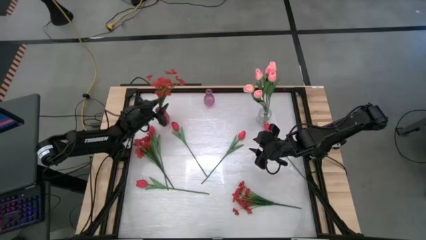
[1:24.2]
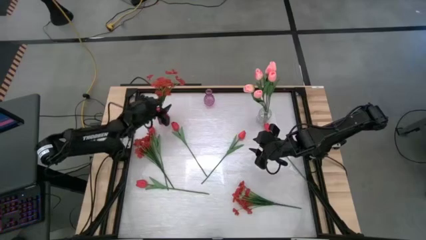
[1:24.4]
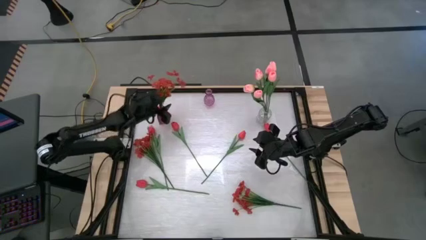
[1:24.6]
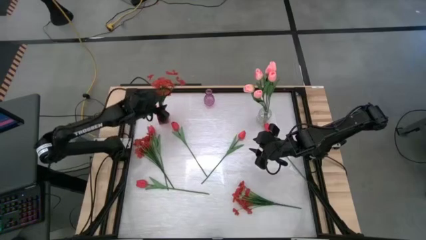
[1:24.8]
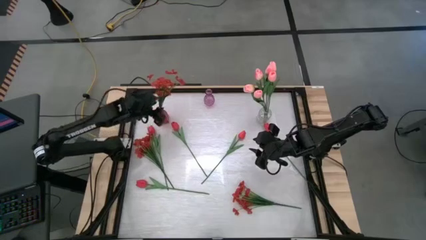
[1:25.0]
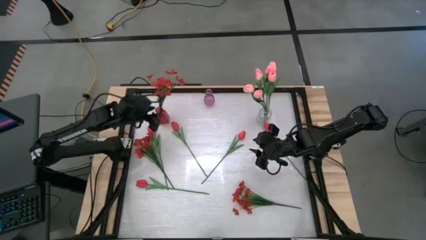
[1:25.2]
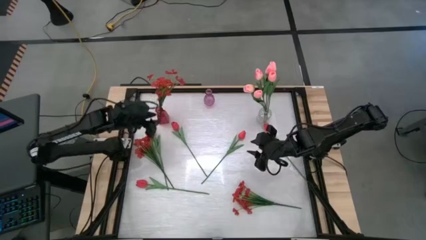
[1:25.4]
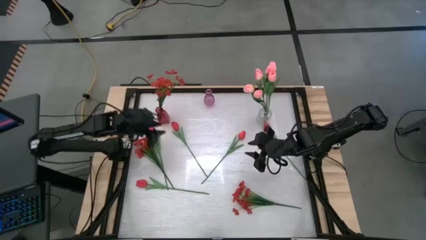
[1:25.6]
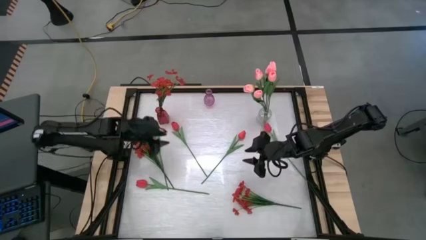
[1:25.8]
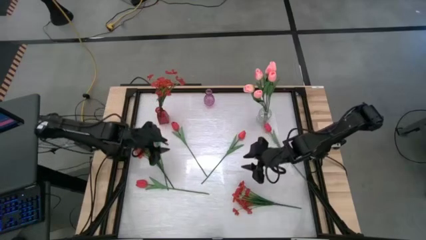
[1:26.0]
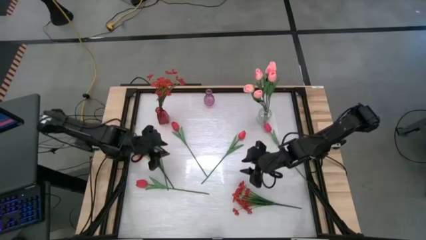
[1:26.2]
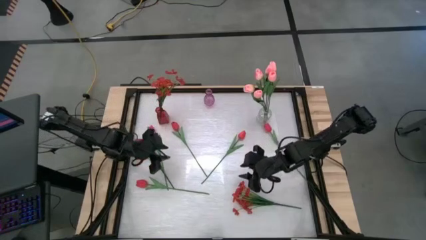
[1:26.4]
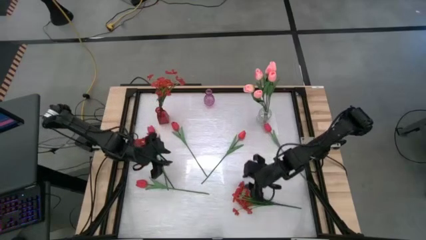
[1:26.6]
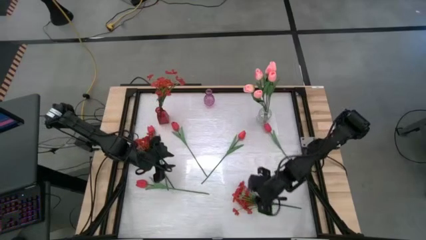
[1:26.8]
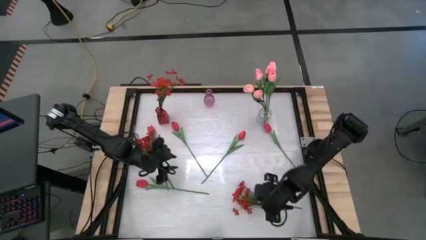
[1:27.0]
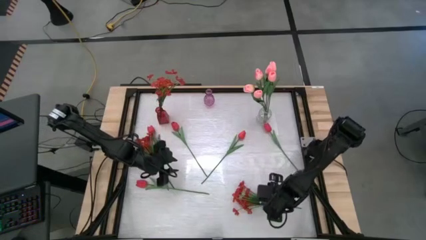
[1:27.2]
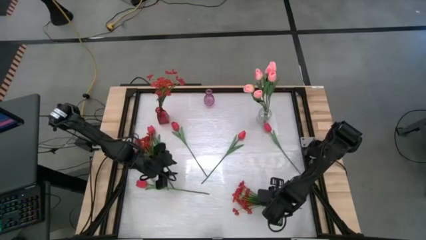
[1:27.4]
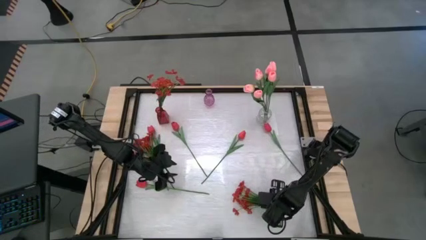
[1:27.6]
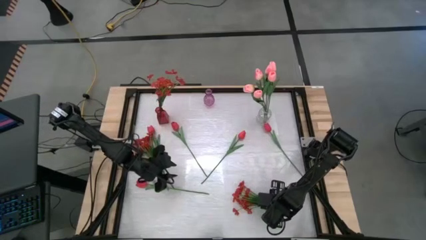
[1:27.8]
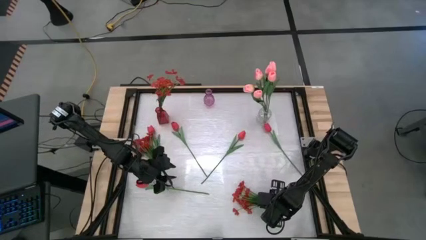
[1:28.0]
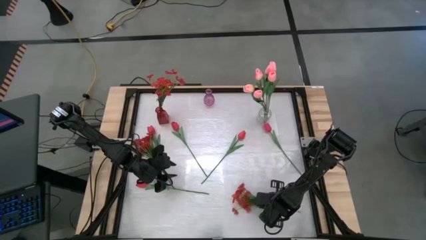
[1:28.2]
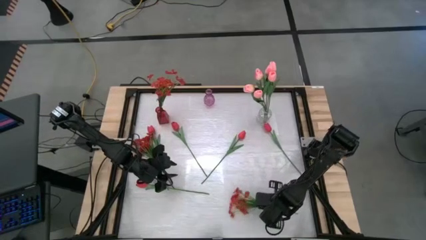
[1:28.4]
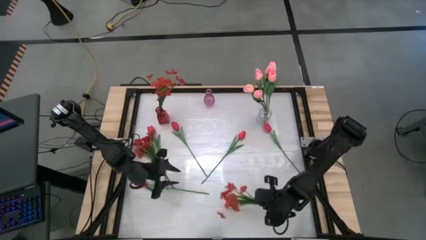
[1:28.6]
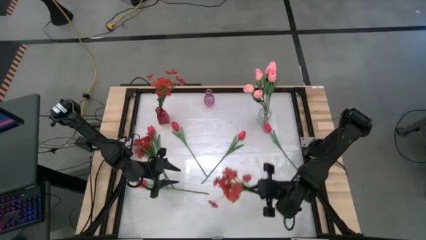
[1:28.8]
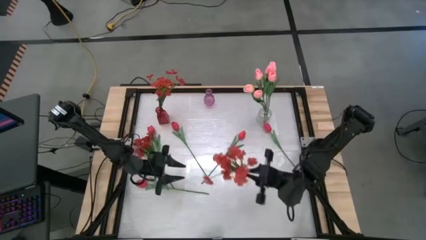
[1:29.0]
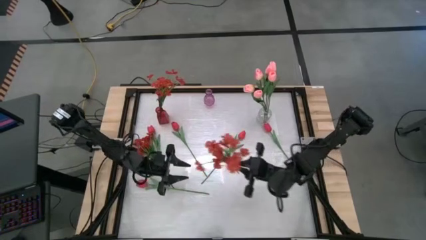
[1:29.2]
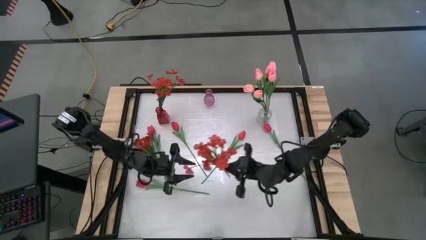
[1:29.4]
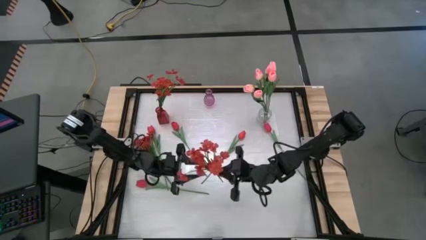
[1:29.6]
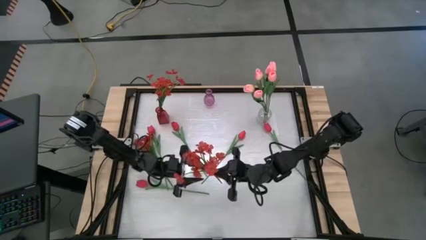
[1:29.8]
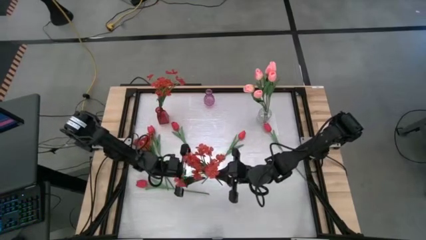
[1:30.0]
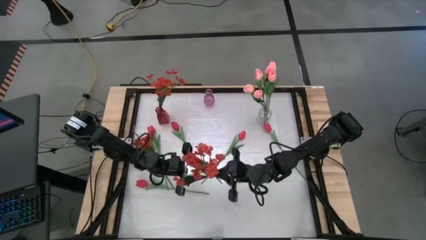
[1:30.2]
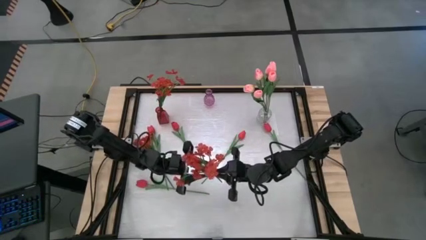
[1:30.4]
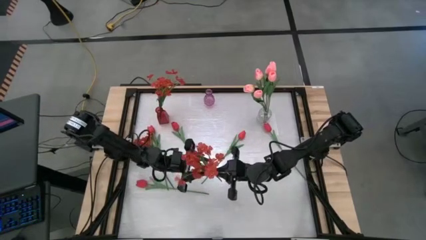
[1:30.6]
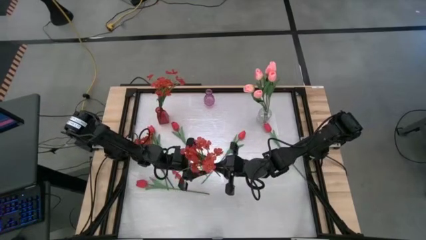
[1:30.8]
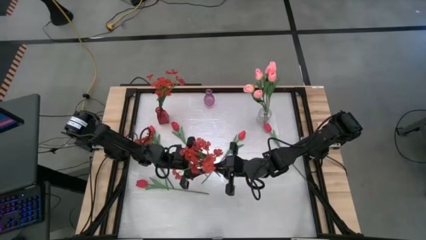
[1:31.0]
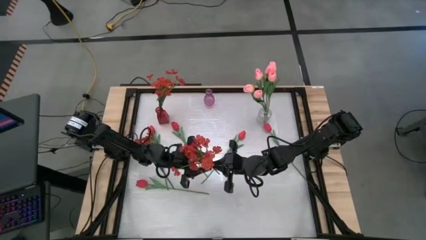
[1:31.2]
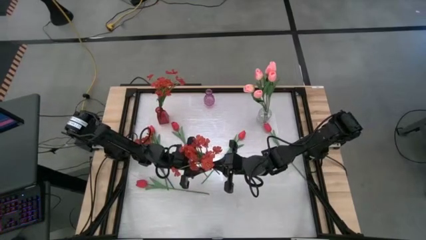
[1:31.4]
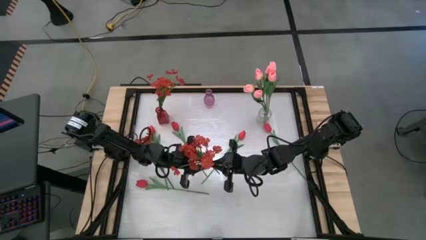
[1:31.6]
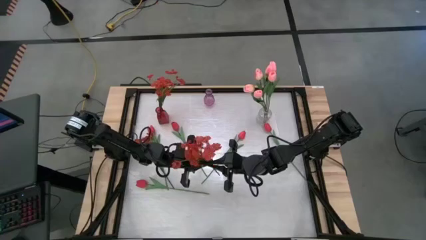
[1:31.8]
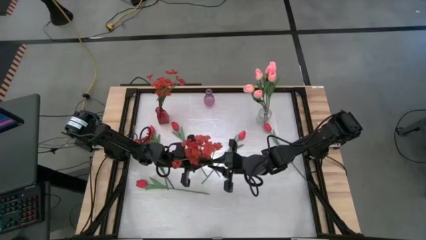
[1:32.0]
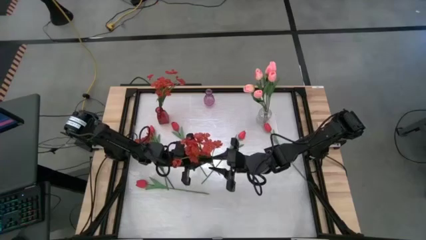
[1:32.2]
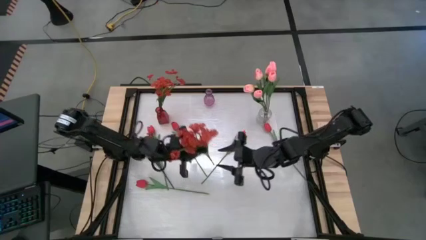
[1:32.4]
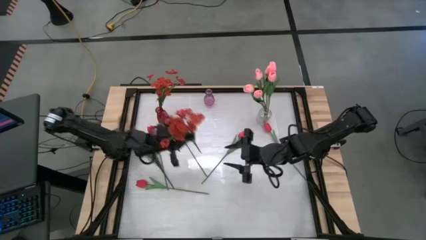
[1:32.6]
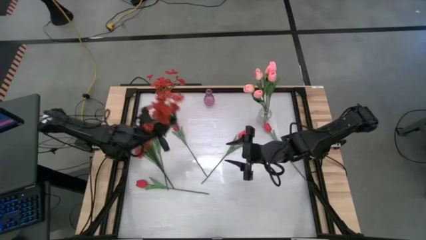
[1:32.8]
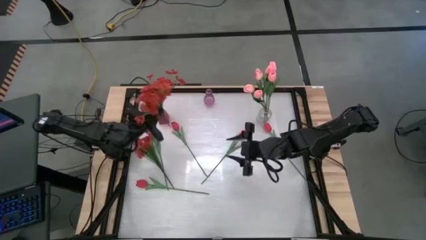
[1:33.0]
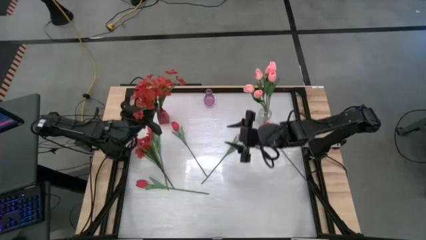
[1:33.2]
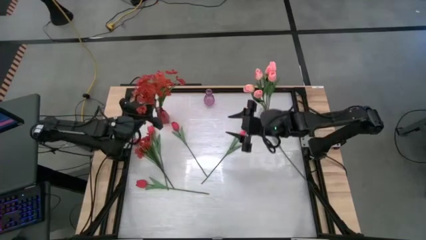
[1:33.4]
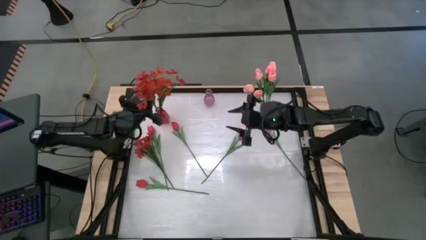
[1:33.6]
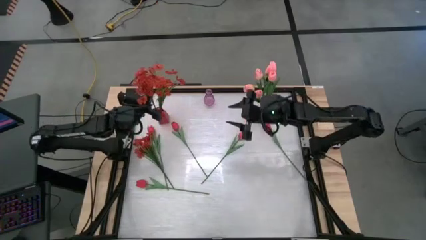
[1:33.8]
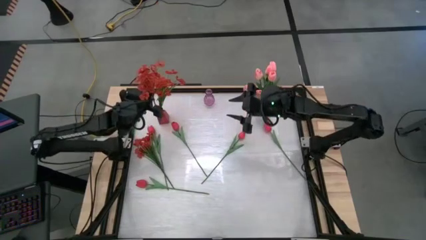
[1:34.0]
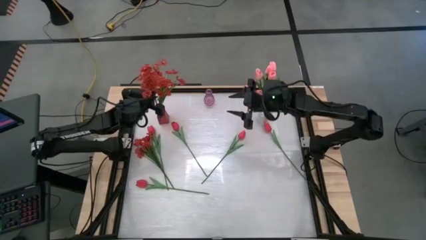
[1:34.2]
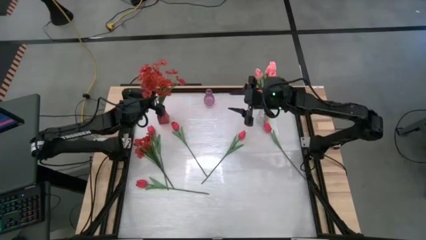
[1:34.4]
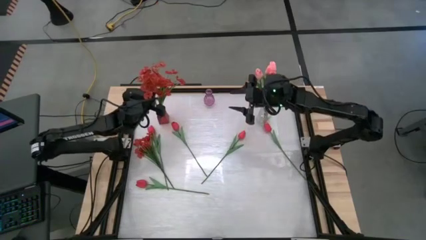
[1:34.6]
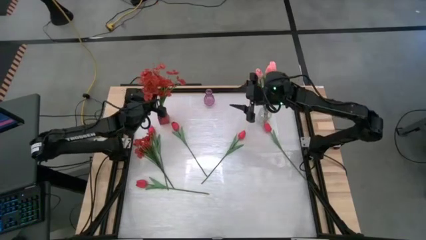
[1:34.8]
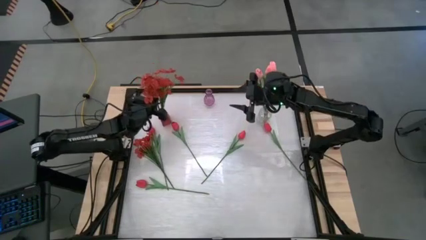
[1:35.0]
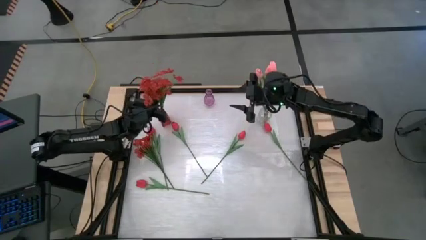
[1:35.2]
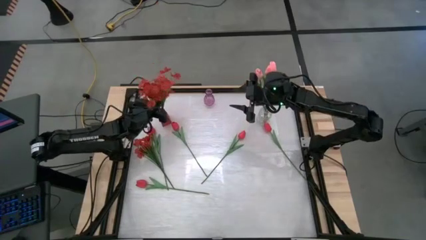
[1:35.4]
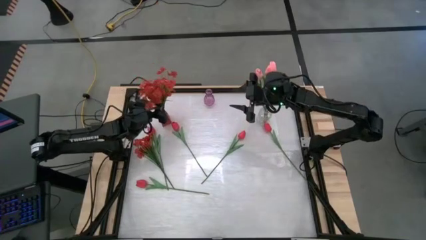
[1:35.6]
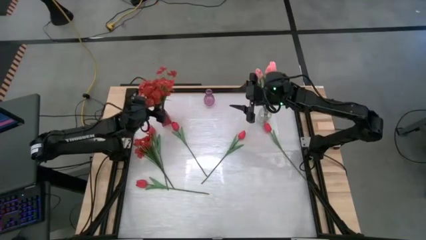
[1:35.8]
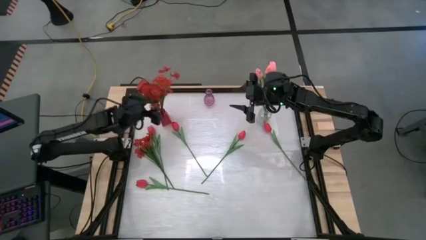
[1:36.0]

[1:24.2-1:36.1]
Task: Sort flowers into vase by color
Put the right red flowers into the red vase

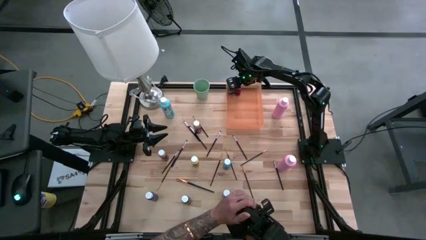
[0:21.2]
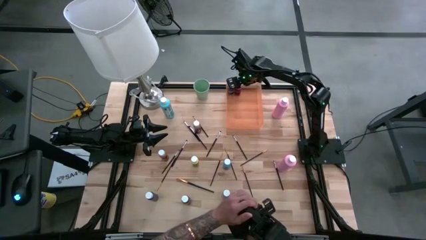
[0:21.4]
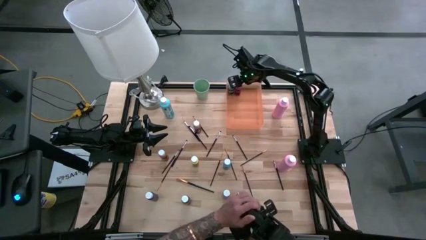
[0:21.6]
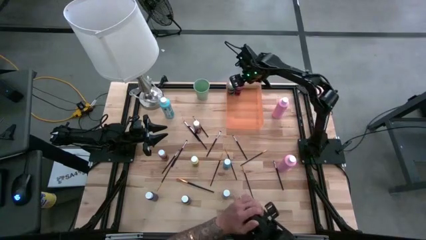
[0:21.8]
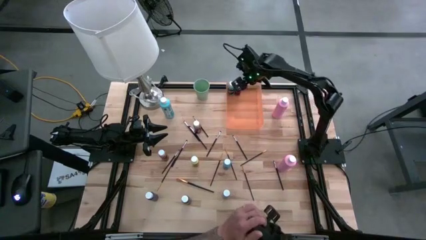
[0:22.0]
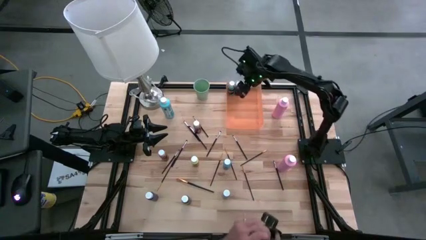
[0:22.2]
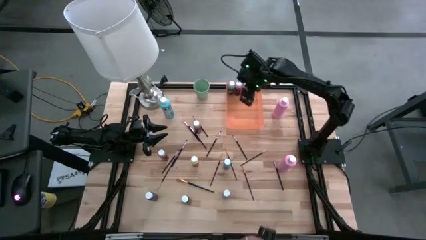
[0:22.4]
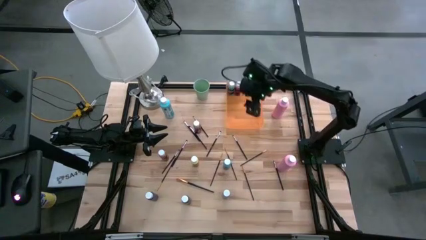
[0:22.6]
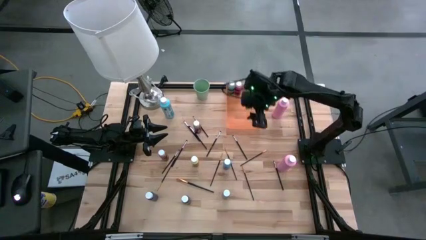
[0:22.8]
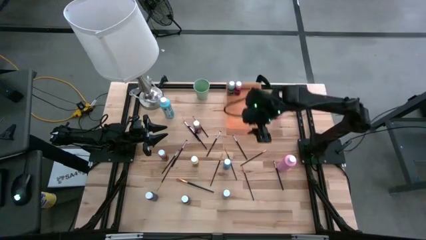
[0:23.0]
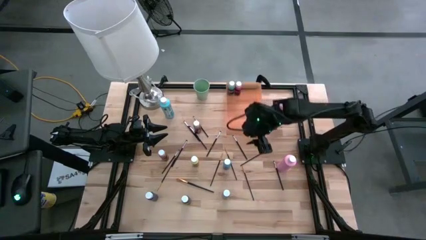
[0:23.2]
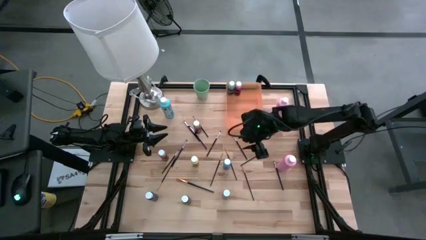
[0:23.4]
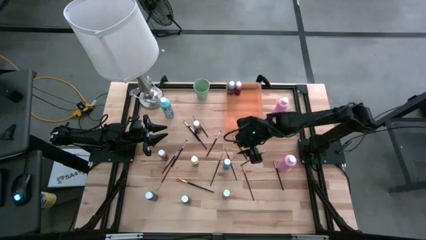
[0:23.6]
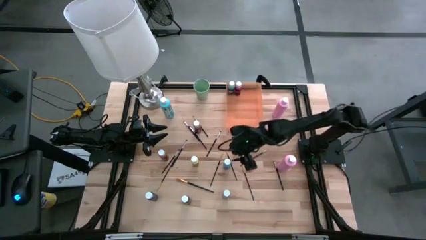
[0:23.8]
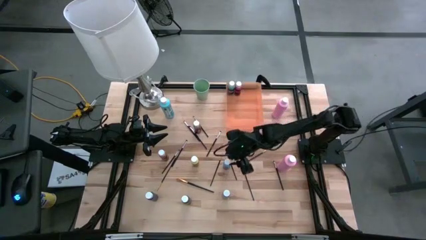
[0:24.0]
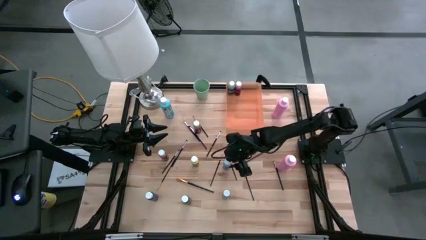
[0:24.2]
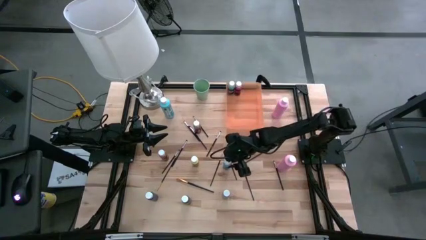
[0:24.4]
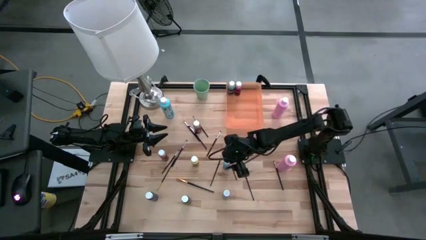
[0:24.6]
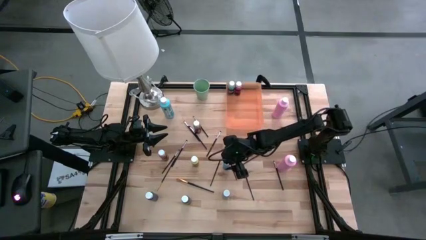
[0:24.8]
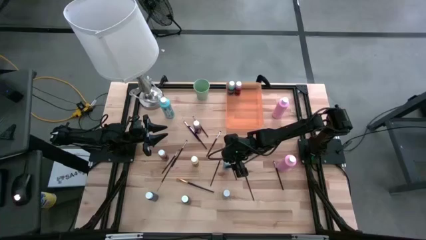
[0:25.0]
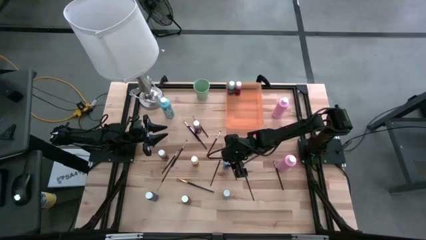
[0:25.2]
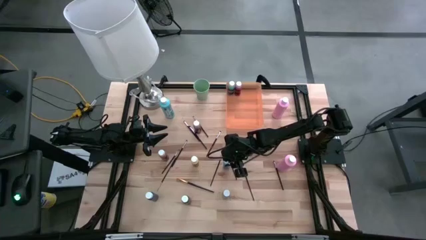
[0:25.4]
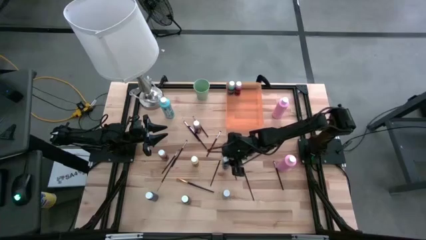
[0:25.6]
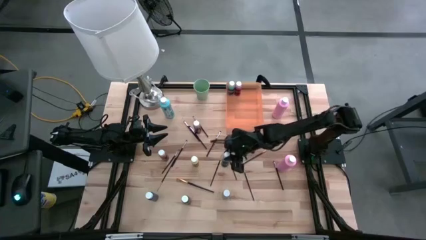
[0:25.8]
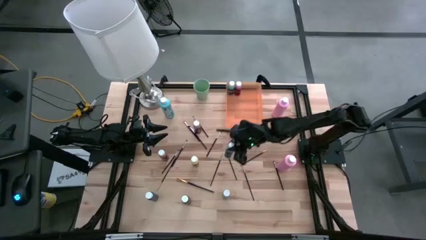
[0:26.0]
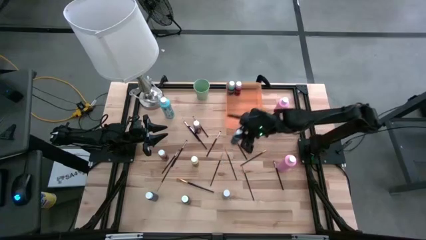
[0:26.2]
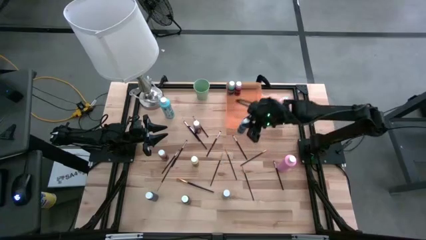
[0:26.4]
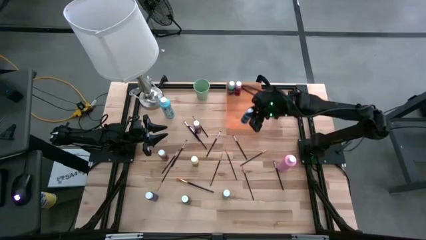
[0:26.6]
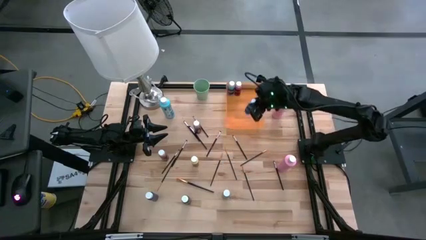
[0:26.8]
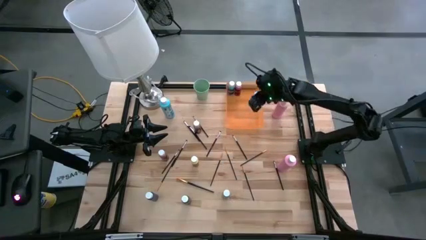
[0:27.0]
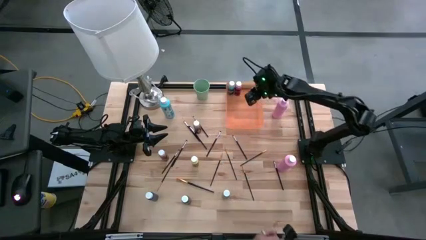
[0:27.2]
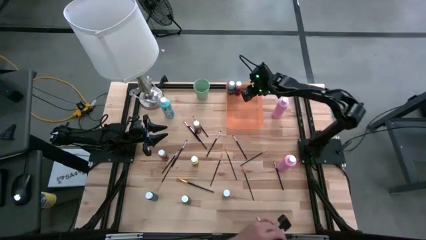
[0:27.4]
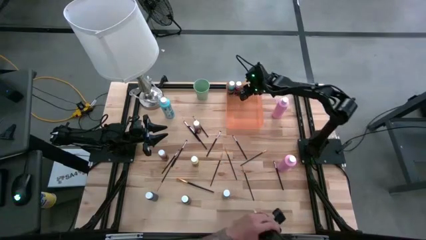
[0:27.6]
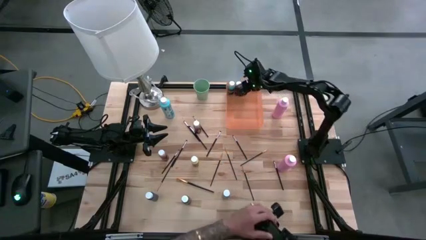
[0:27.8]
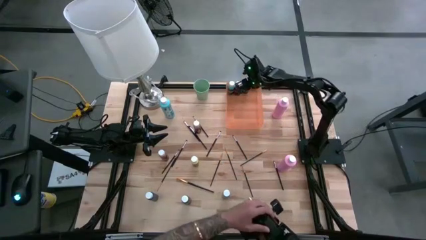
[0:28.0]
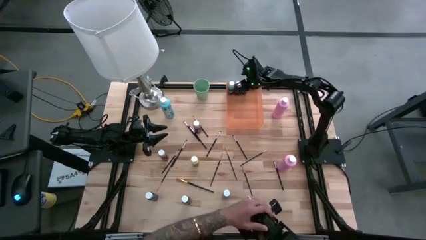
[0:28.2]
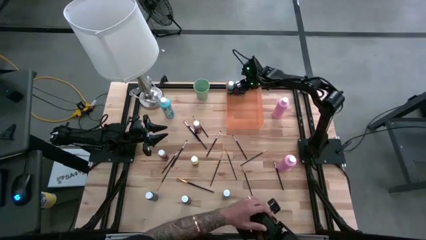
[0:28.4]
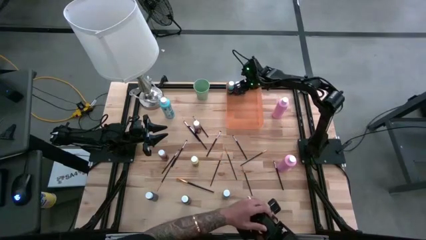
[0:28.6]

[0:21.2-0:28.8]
Task: Pick & Place Paint Supplies
Put the blue paint bottle into the orange bin
